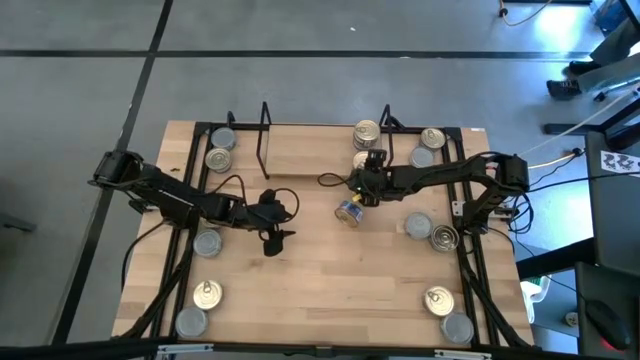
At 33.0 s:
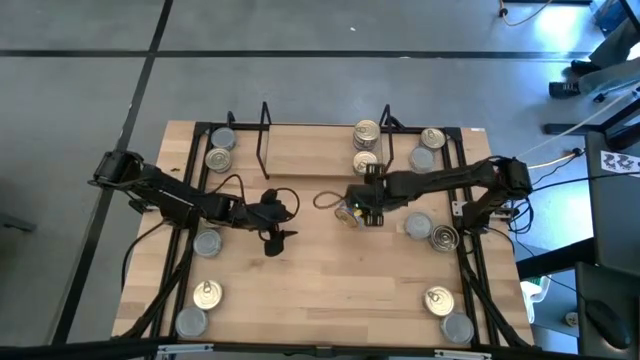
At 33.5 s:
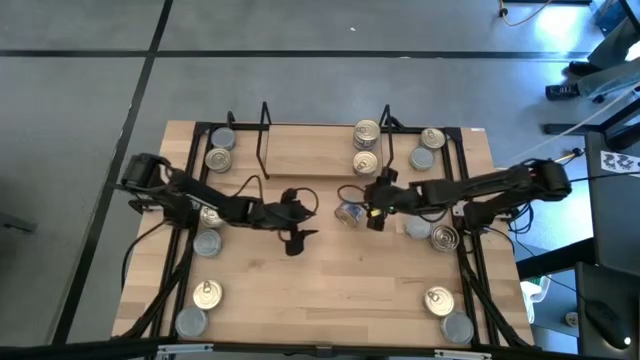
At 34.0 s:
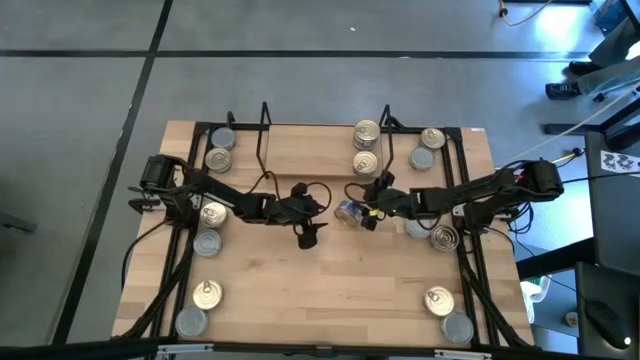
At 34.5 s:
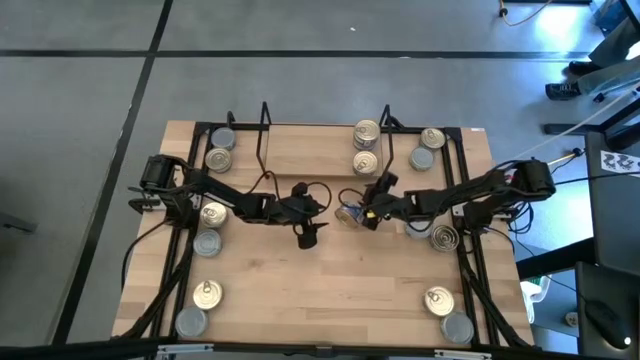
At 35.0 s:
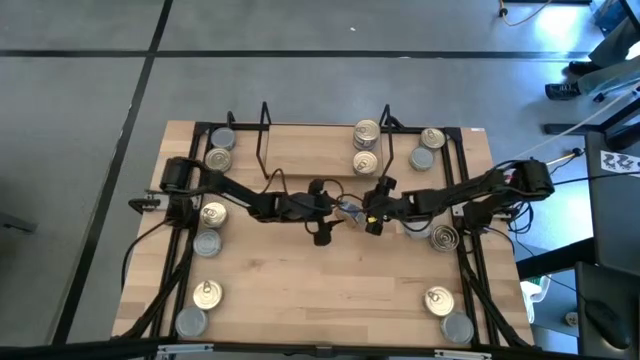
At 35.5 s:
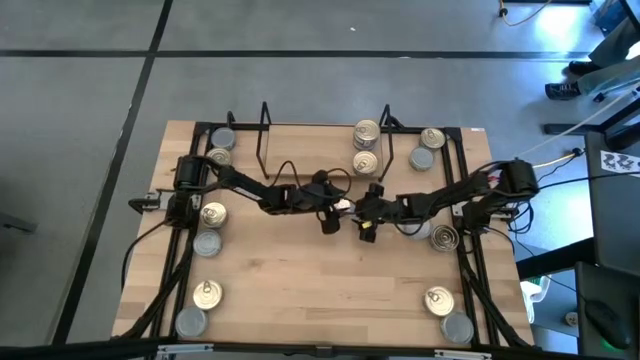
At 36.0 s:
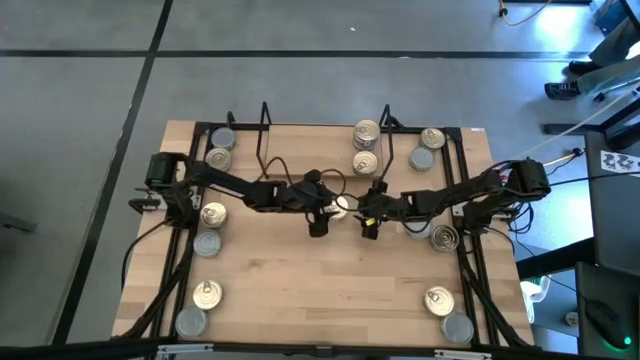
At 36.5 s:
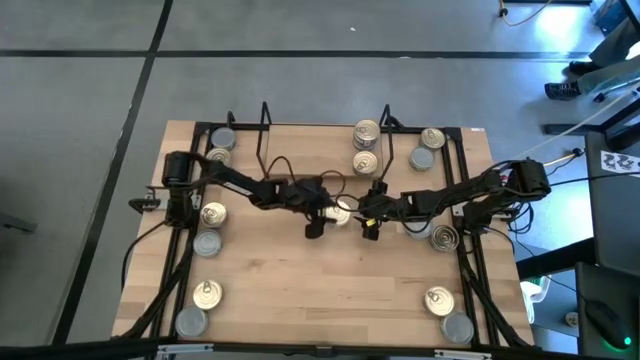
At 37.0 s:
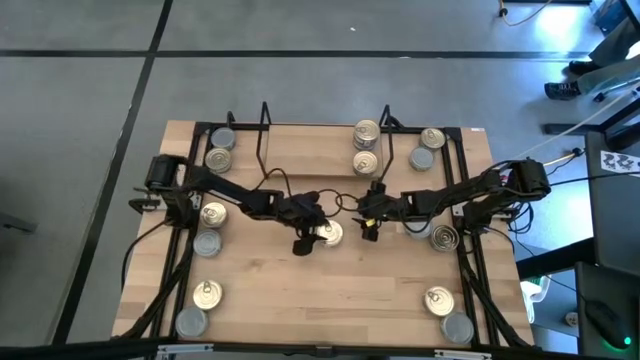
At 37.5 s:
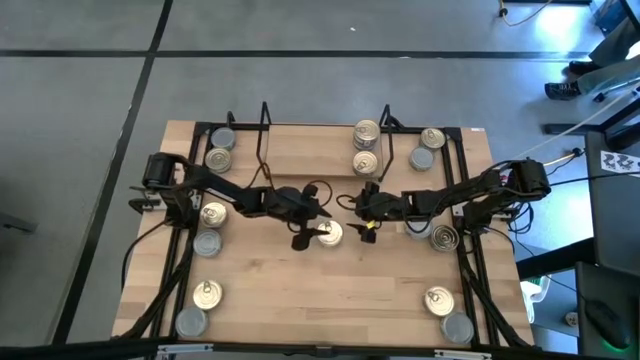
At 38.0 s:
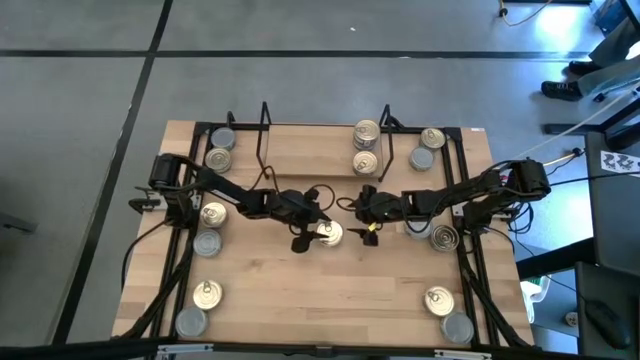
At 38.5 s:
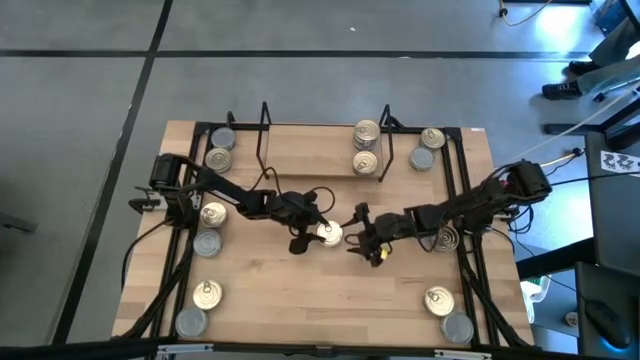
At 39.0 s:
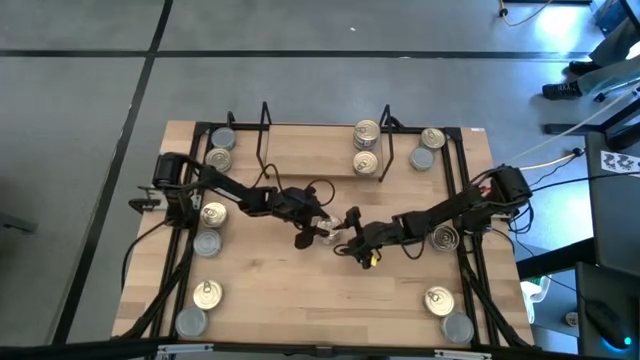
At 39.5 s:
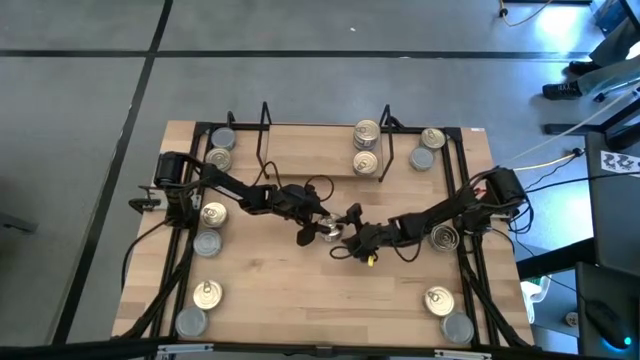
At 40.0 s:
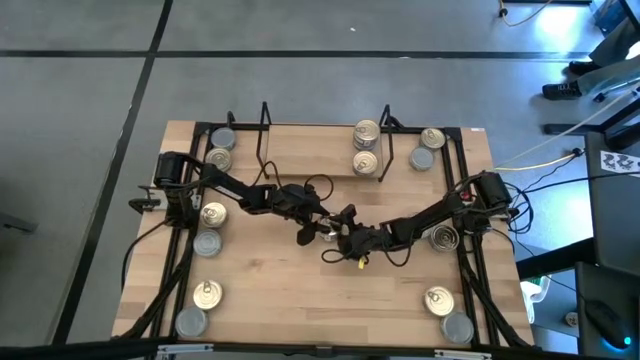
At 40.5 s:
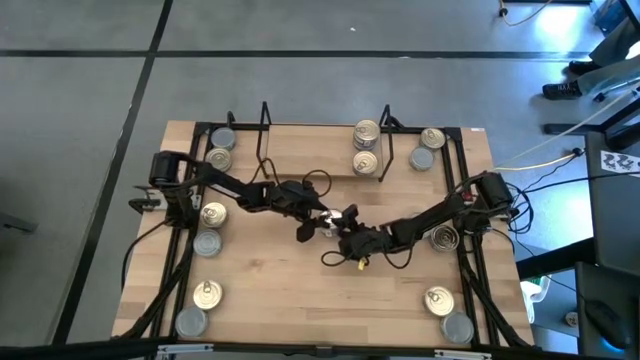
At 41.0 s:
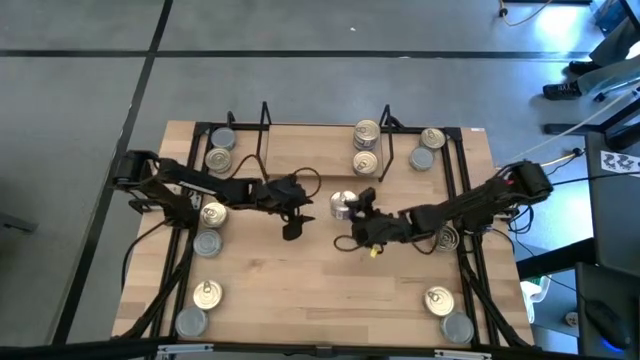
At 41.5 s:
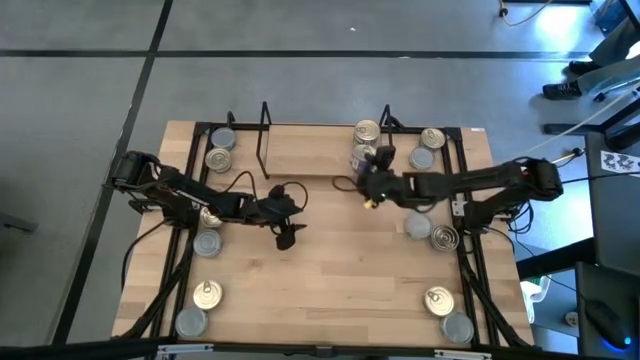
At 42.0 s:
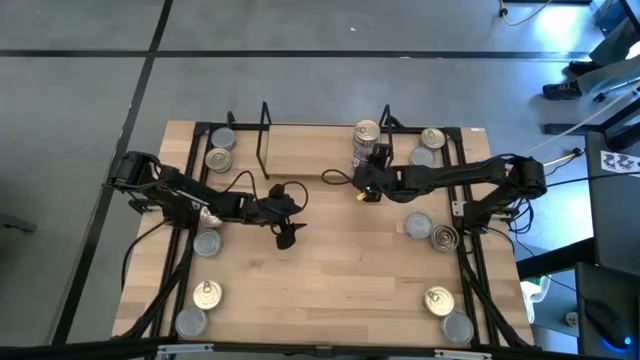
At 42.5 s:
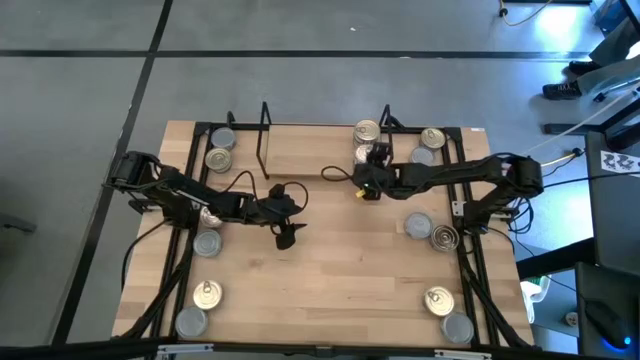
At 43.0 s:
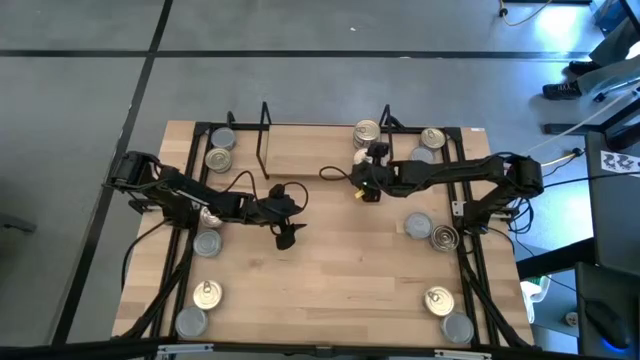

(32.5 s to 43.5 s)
Task: Stack canned seafood by type on shelf
Stack the blue-pink tuna can on top of the other blue-pink tuna can on the shelf

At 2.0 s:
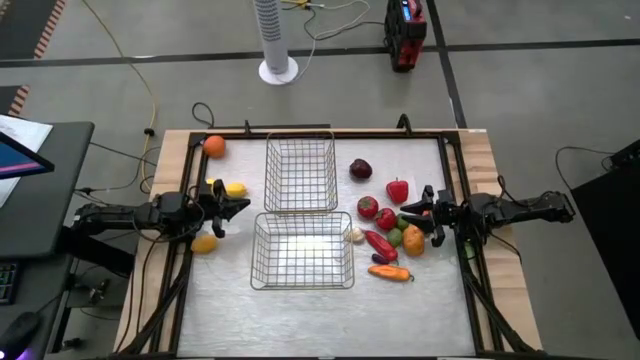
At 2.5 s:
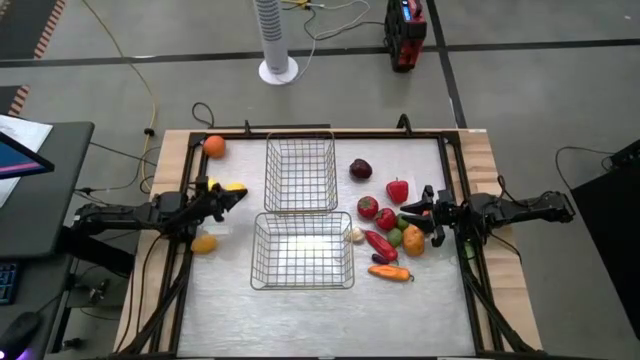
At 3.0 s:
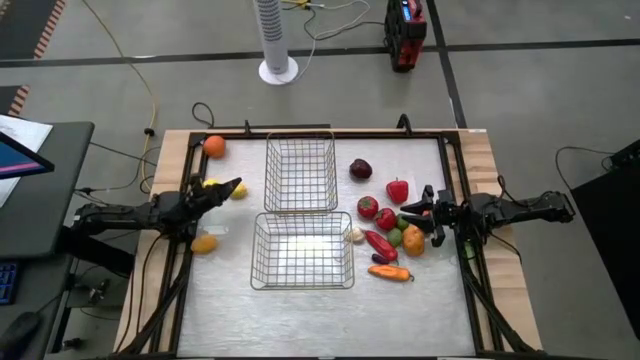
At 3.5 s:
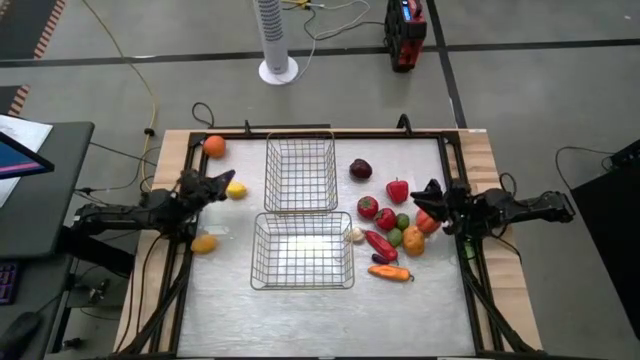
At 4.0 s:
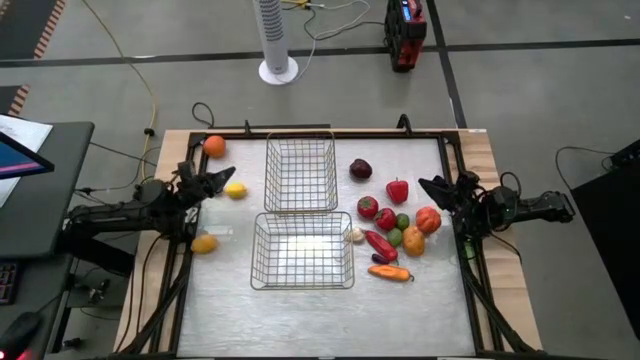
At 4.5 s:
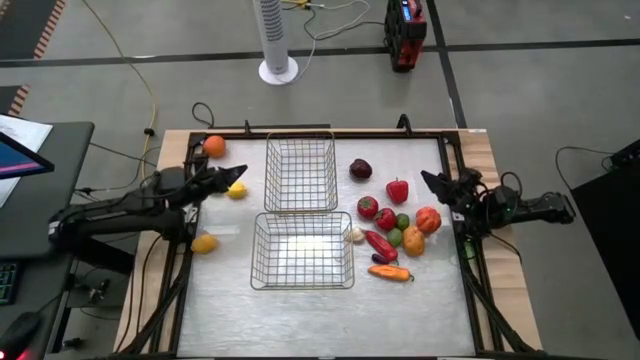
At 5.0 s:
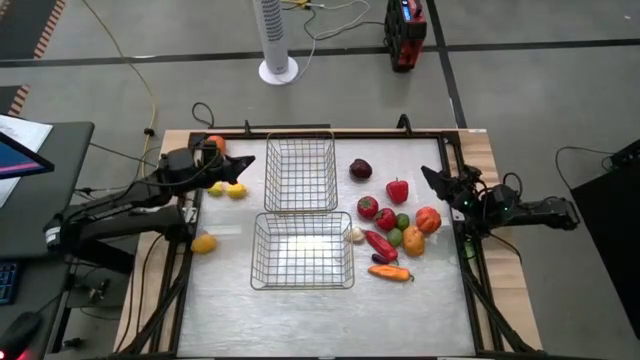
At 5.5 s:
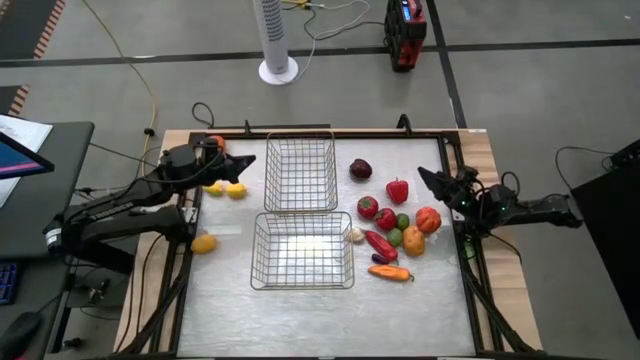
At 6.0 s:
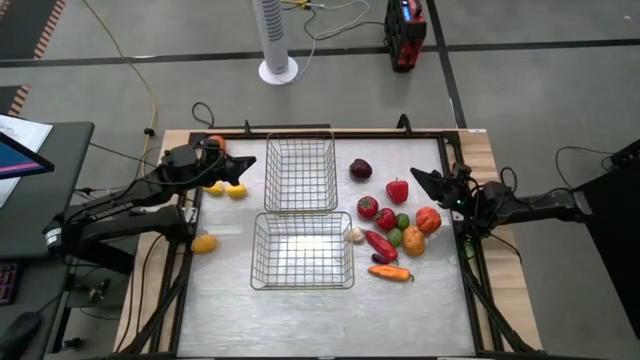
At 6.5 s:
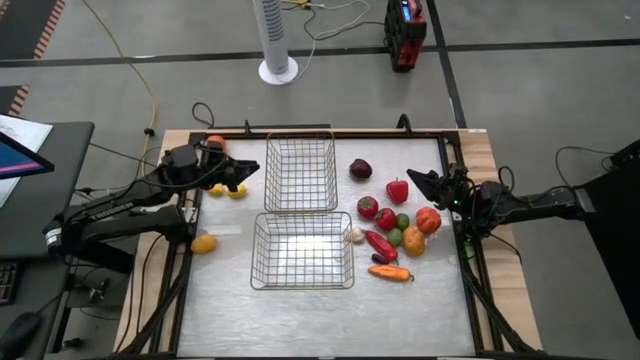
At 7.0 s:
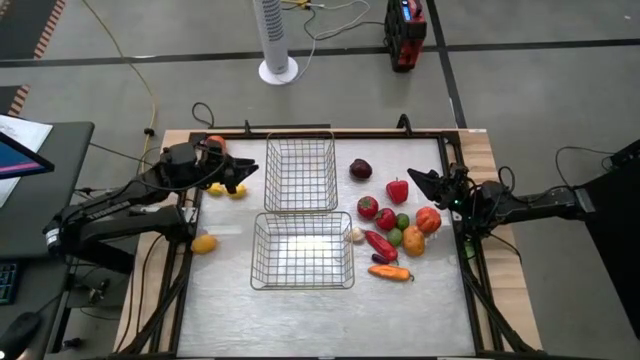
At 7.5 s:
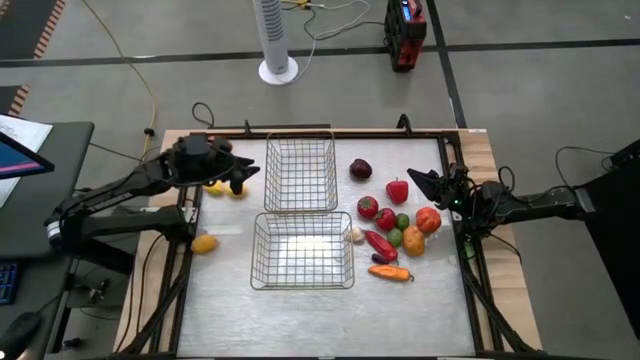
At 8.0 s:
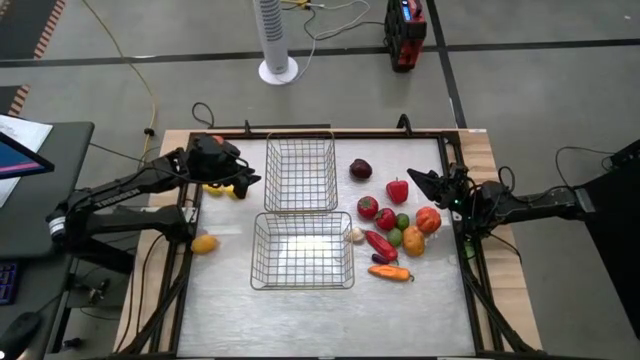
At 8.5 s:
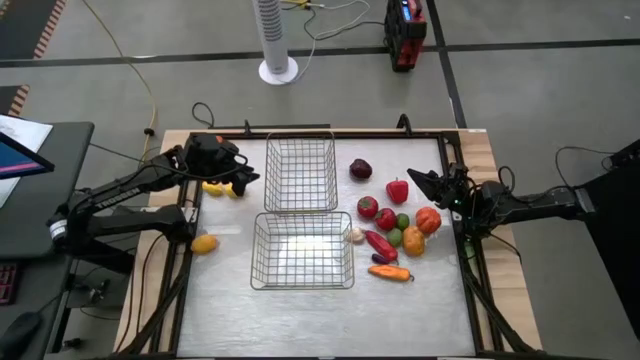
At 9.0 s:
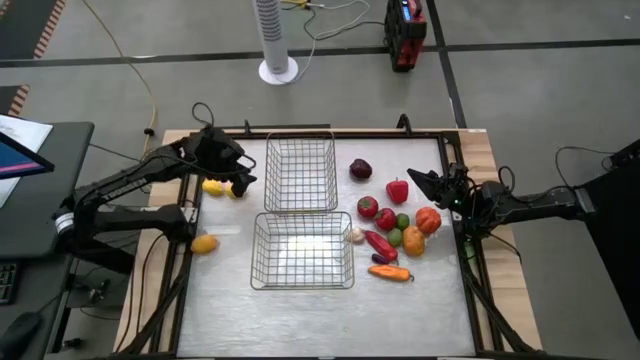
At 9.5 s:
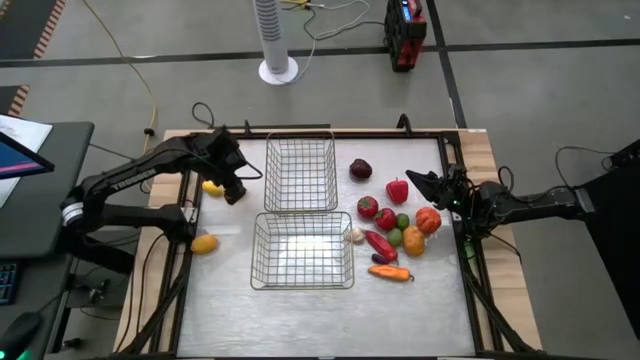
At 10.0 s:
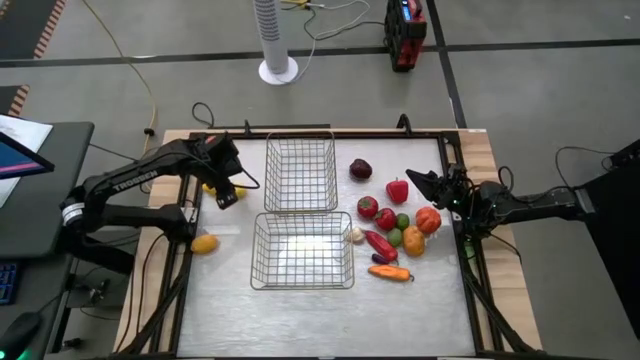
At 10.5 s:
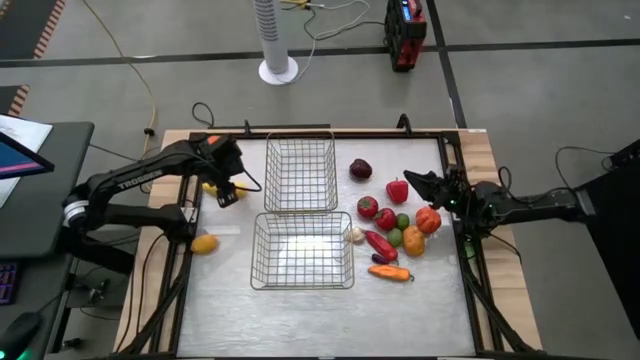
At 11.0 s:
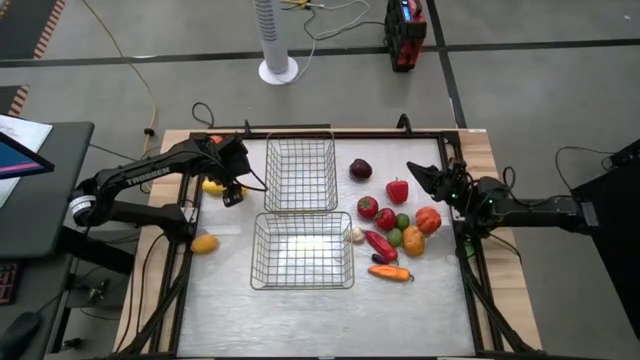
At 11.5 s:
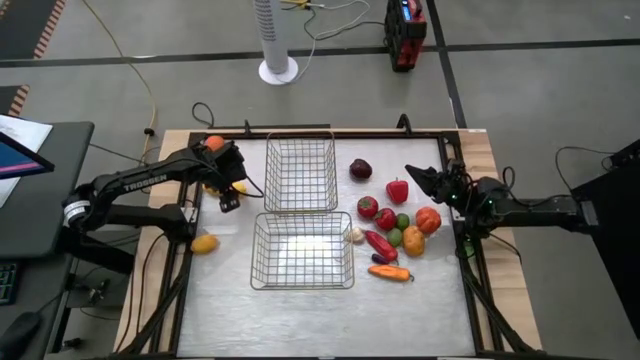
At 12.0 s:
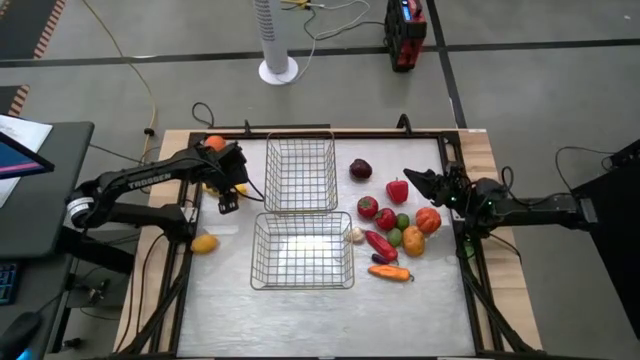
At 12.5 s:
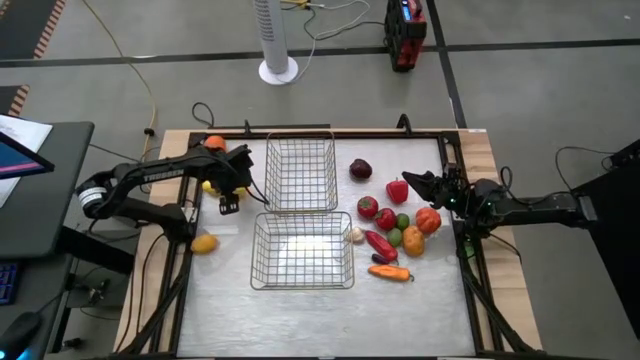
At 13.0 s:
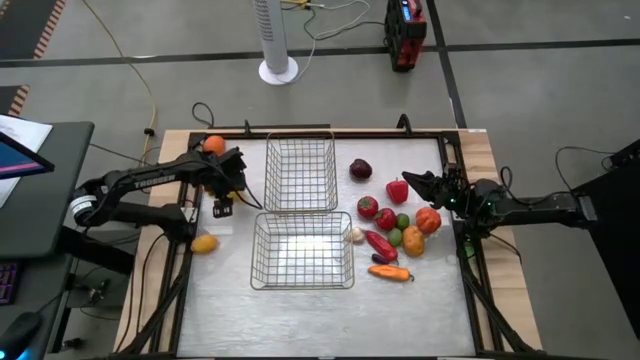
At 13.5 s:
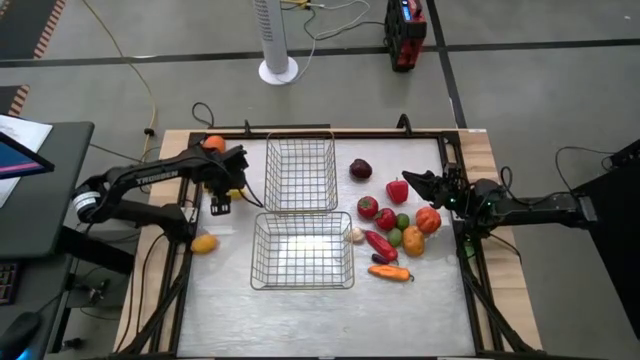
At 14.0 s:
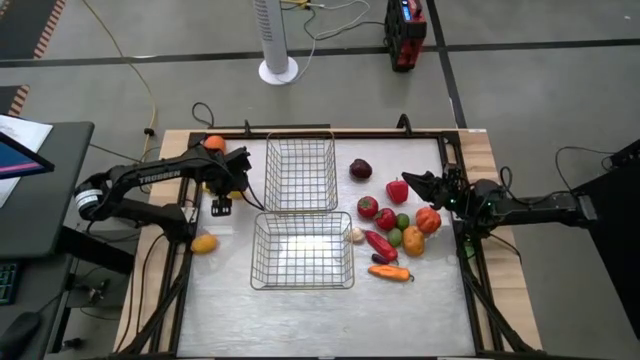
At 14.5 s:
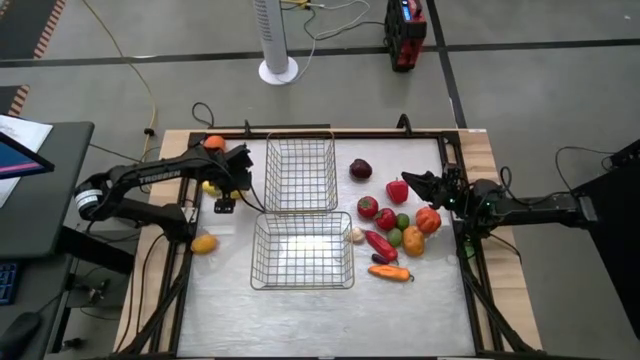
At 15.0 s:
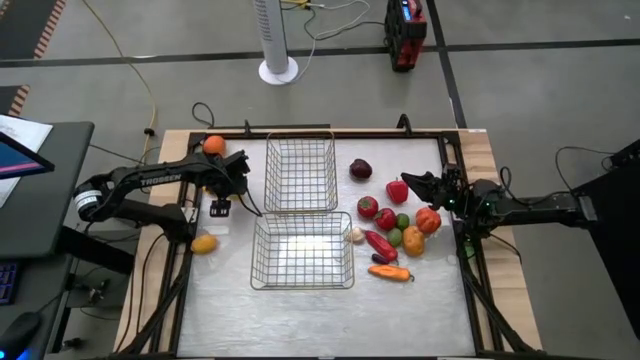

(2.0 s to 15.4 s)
Task: Sort produce into baskets
Put the right yellow lemon into the top wire basket
